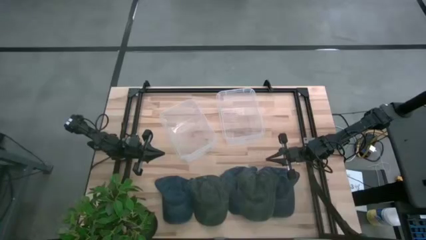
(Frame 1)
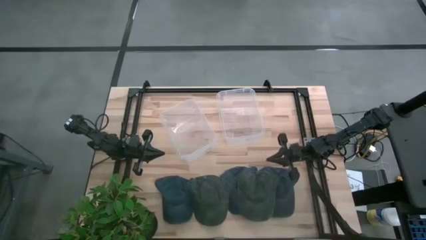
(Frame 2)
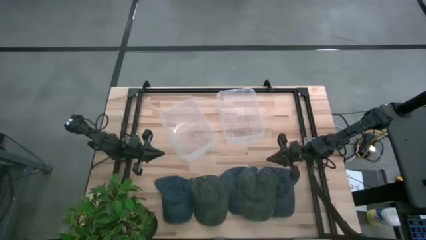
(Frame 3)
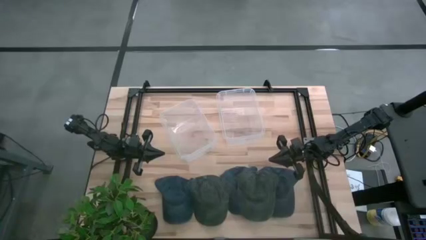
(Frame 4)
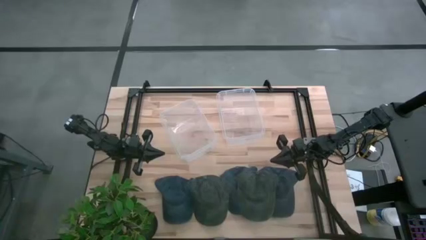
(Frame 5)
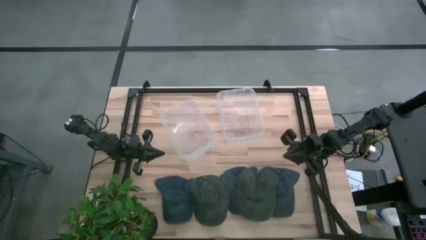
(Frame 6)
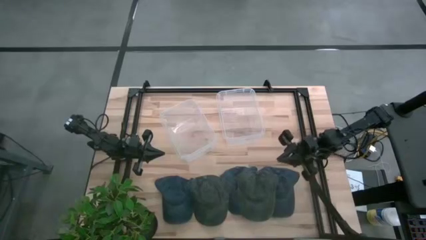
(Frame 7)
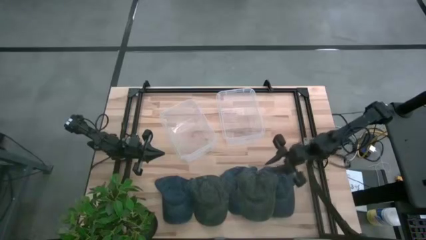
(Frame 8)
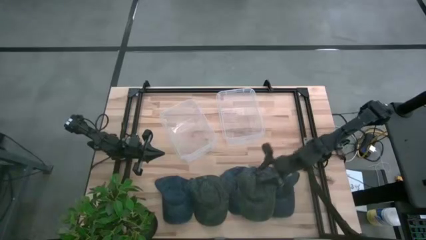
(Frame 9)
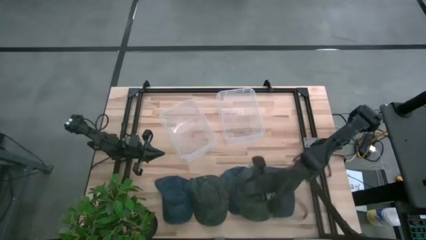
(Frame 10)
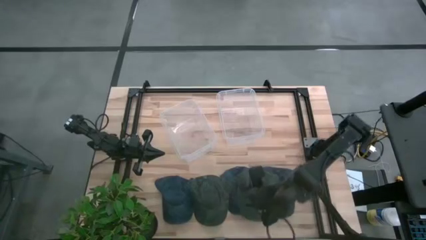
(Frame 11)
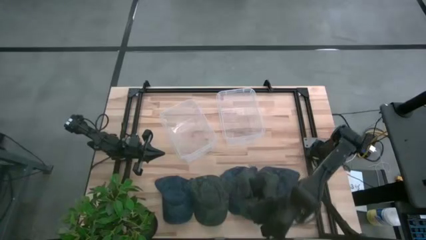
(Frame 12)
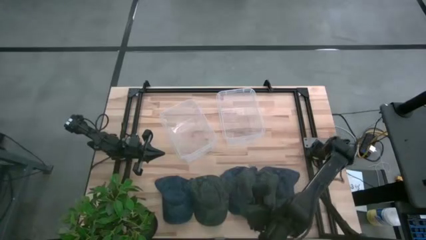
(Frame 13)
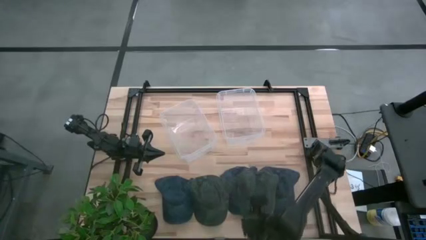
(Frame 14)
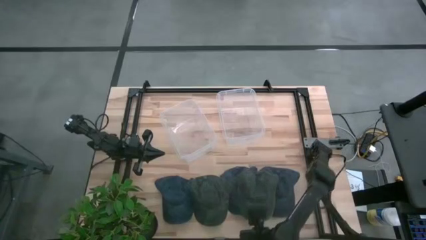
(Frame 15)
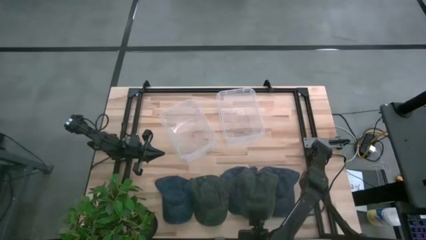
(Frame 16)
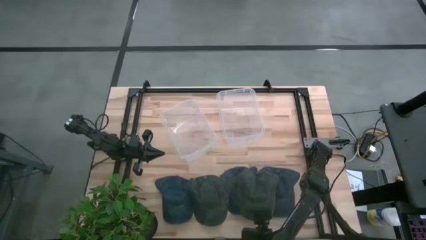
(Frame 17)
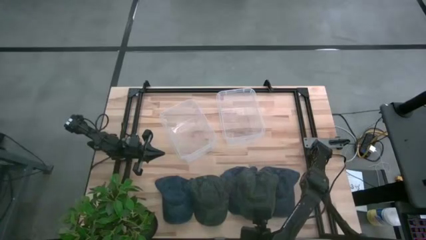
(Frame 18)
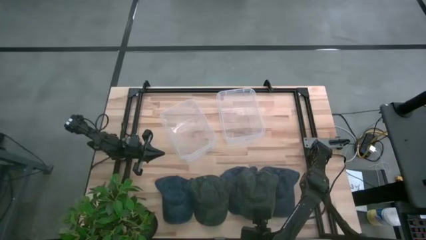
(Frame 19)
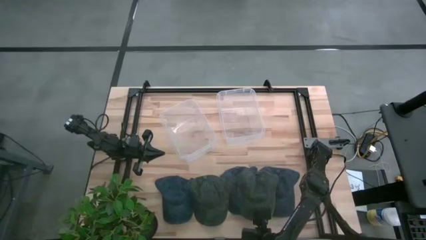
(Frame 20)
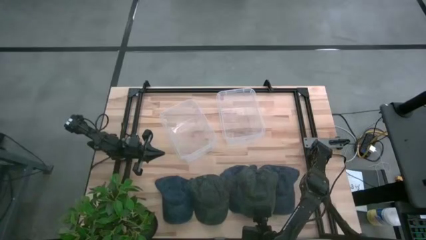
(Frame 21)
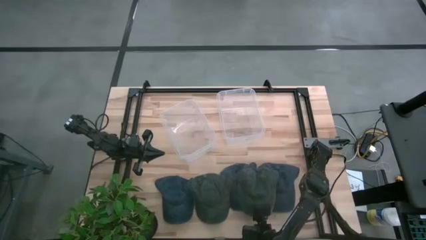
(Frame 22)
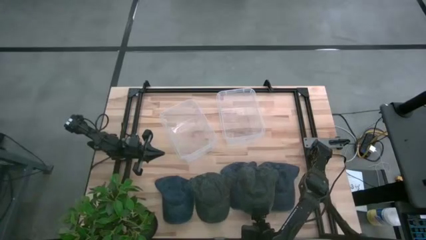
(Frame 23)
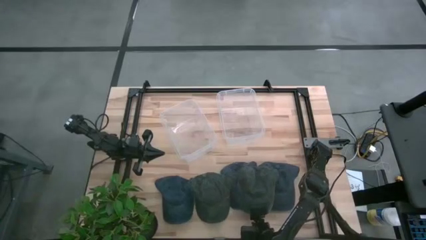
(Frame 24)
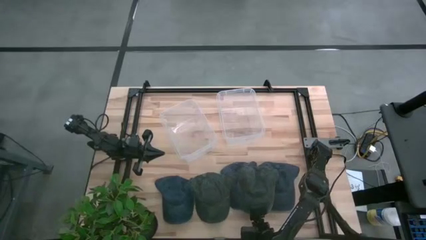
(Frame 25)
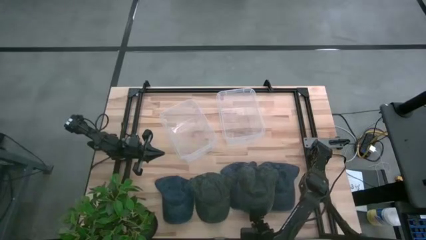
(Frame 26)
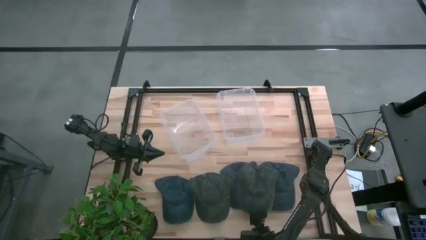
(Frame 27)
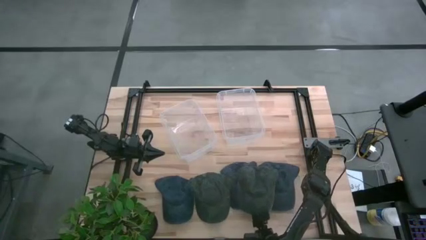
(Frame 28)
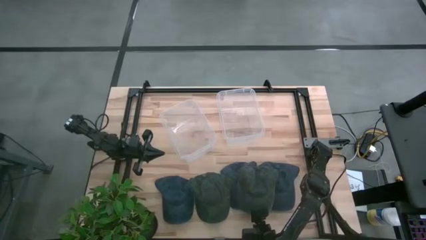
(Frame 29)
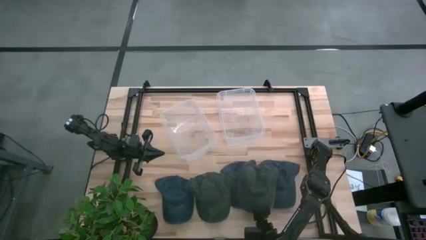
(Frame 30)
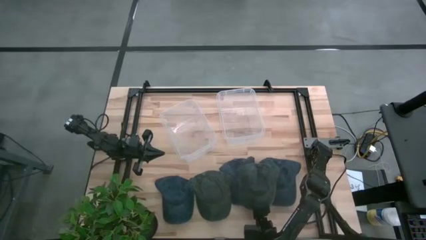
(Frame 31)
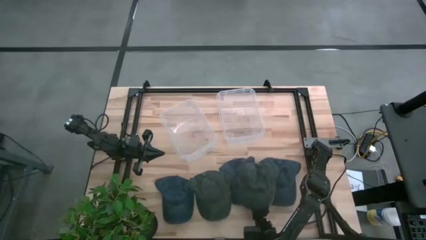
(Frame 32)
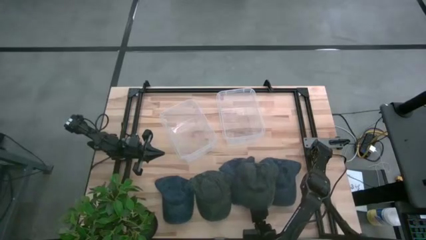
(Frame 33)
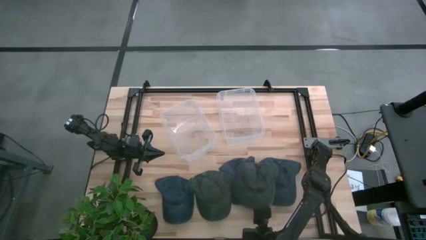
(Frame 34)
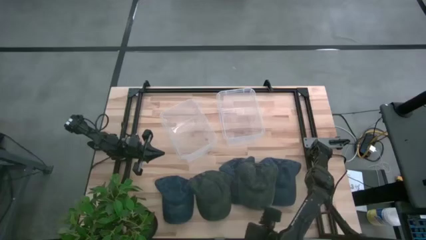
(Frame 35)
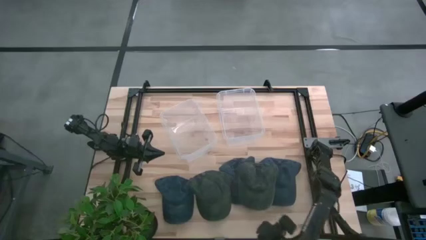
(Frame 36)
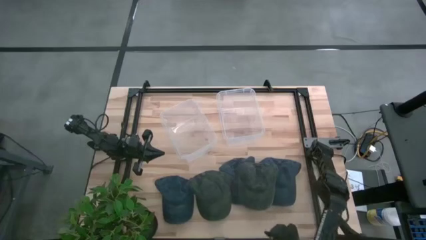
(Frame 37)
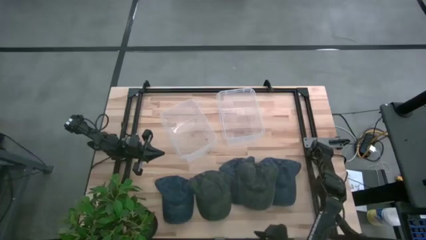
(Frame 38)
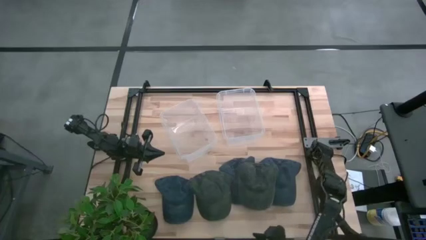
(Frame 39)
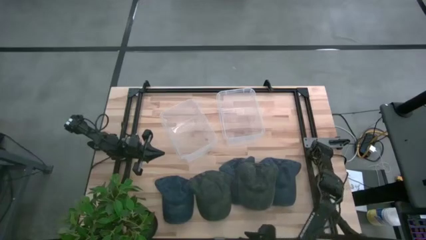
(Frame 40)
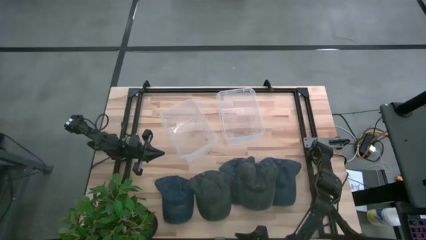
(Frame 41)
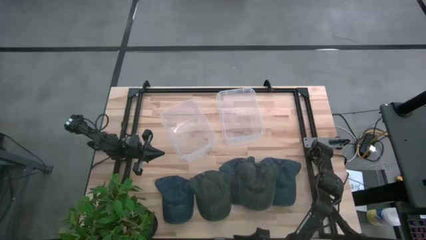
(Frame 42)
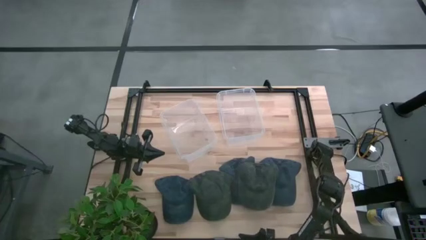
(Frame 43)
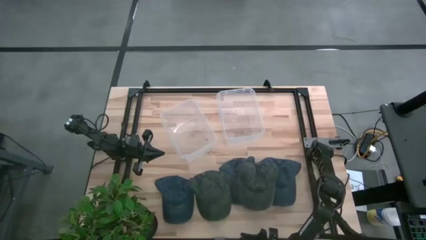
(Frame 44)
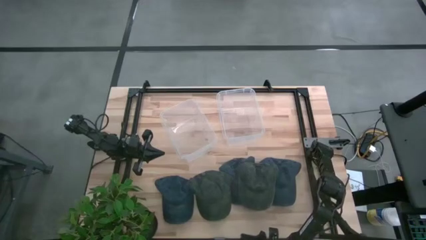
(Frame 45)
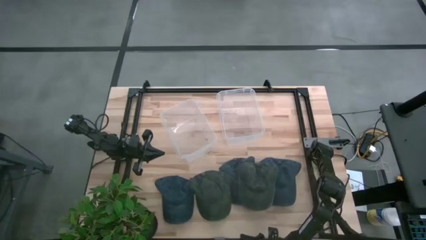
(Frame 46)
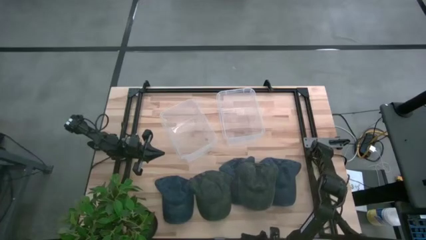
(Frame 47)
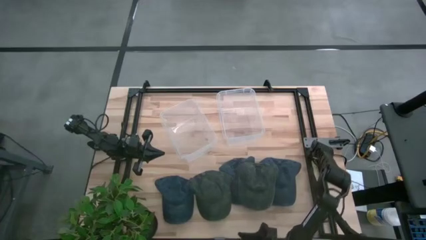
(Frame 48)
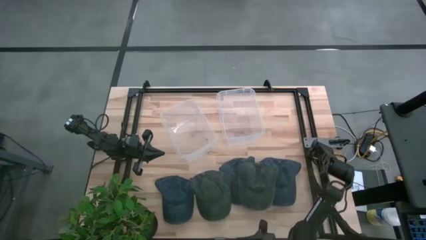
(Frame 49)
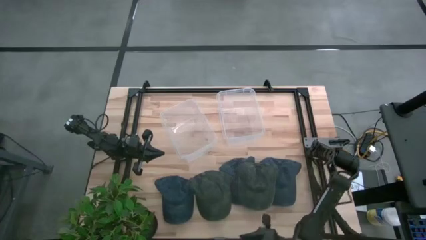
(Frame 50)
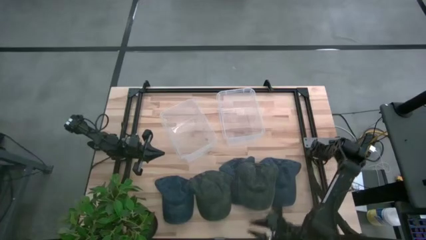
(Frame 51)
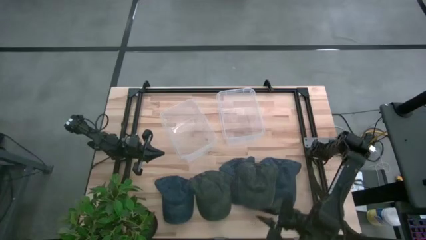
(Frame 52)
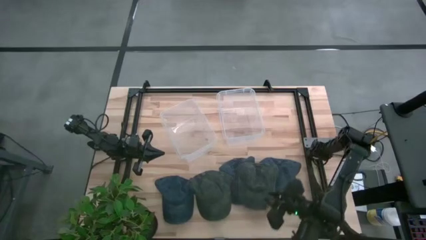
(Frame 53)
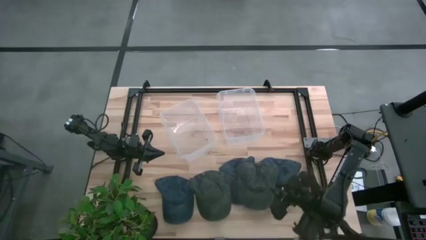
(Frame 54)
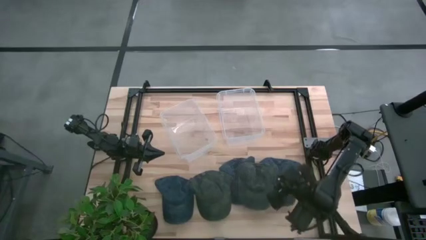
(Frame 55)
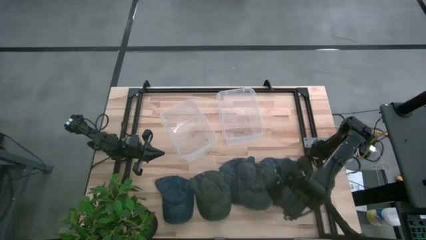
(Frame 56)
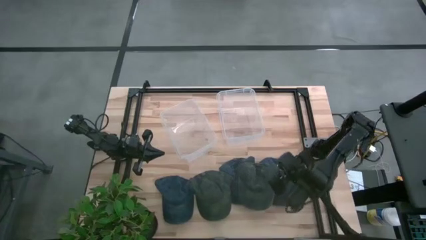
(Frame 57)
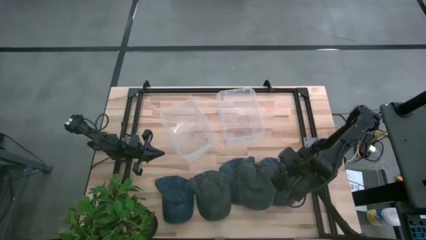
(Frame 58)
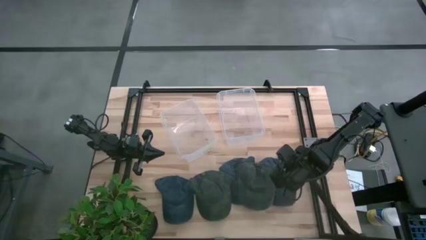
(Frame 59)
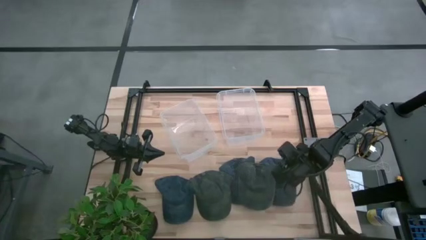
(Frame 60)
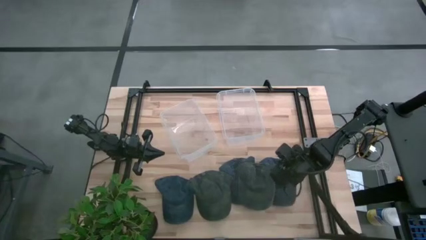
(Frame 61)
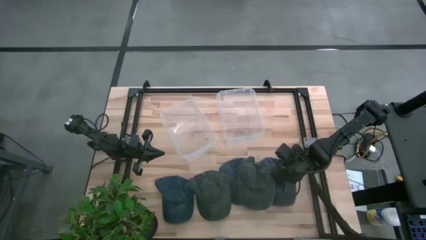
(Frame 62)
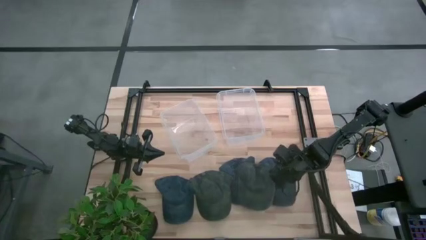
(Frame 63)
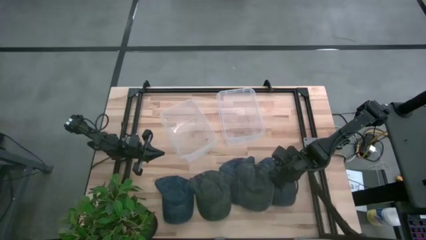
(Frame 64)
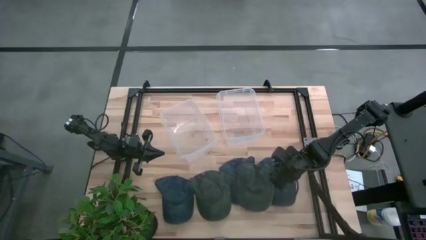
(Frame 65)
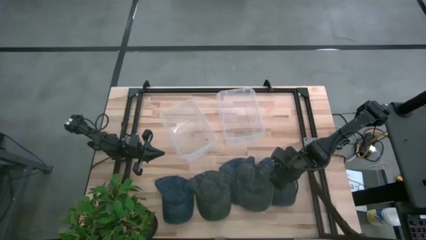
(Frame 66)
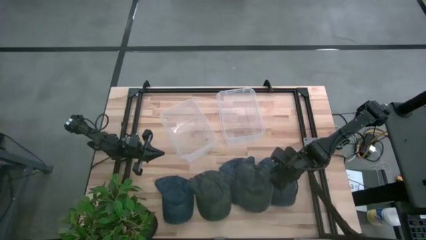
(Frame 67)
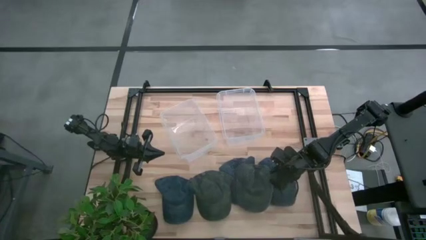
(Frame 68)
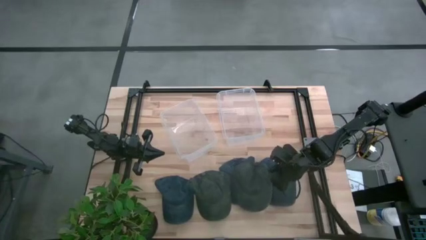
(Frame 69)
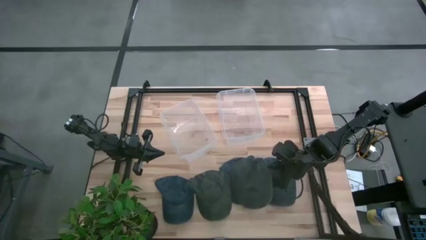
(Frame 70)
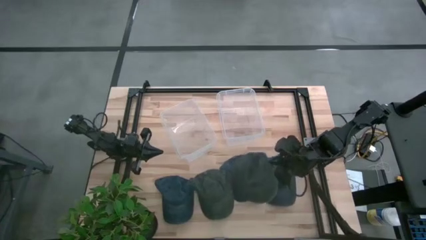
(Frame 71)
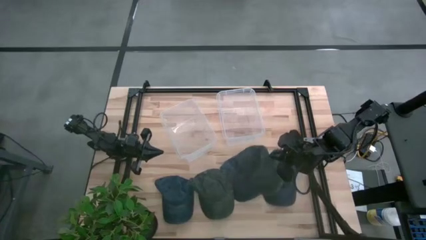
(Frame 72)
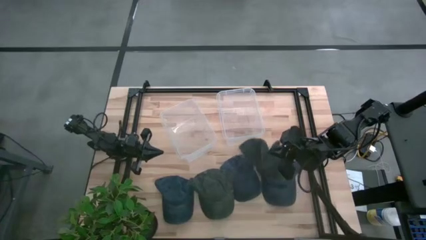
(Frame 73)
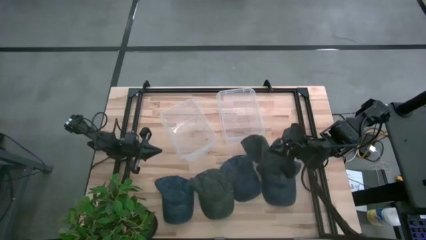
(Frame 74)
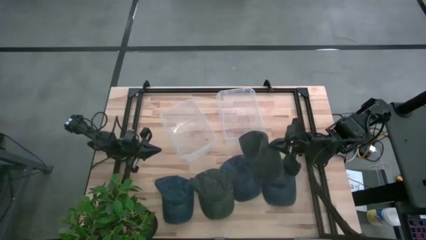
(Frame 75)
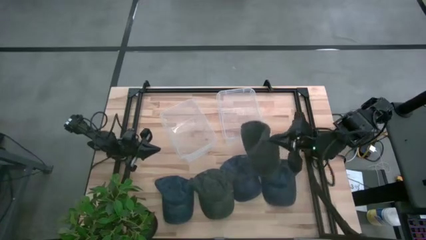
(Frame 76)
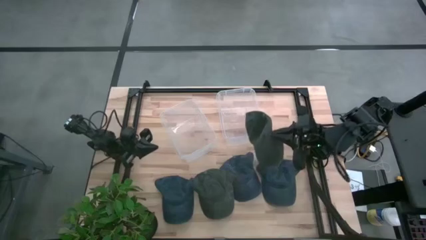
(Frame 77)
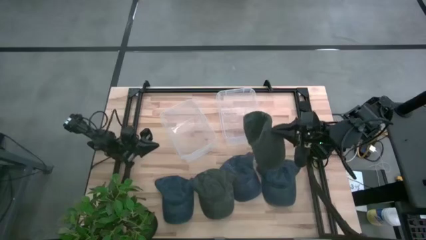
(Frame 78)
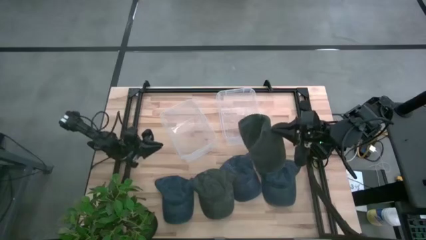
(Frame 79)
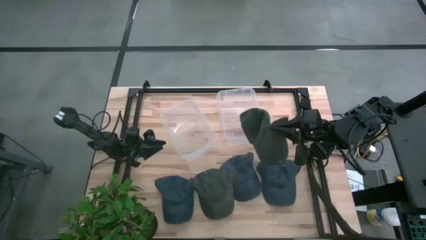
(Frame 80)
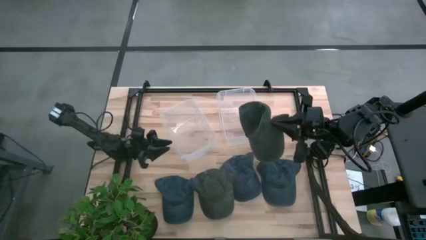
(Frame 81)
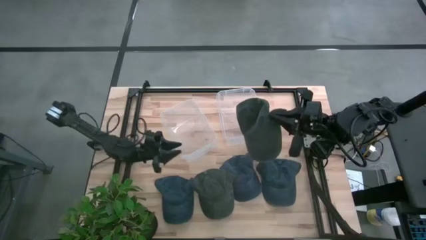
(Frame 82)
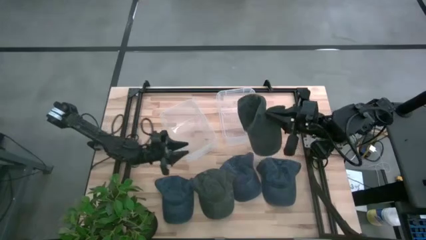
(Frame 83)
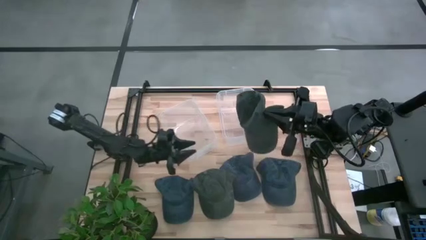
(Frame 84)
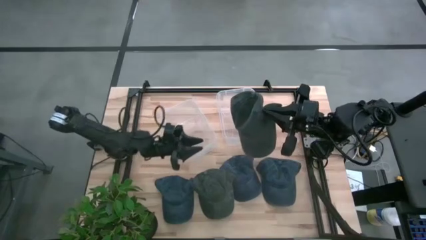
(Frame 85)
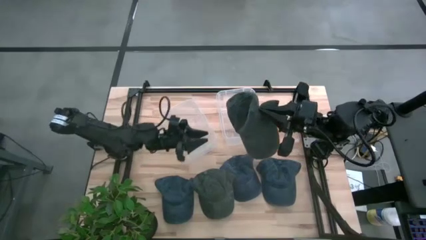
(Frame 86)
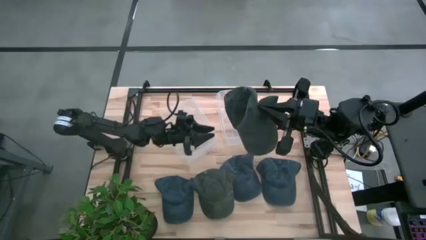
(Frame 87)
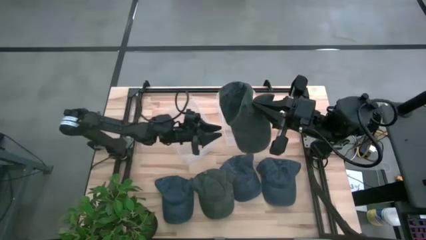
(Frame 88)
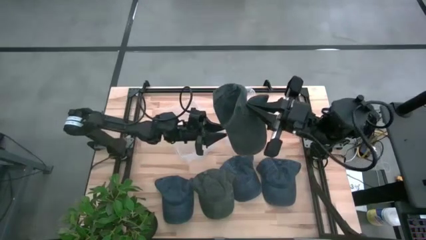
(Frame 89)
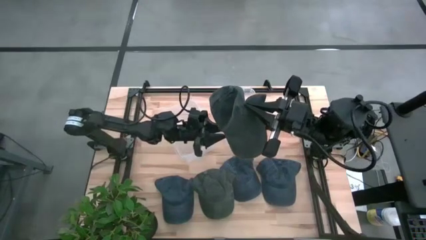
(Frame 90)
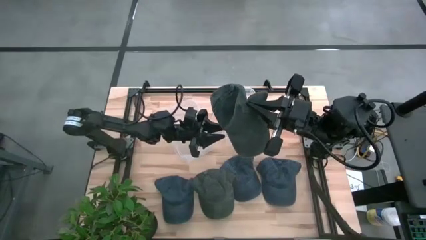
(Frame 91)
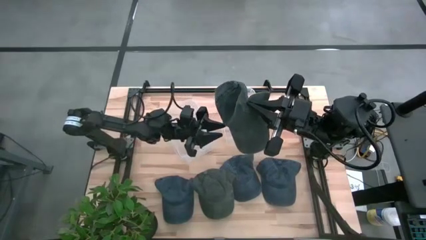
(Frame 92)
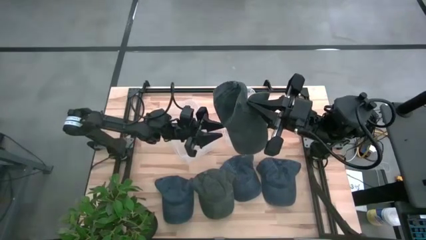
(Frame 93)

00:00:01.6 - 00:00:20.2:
Task: Pick & Place hat
Put the left dark green cap into the right transparent bin
